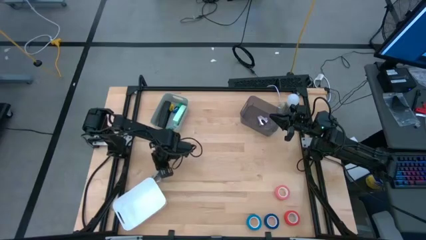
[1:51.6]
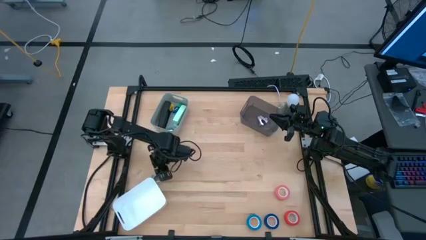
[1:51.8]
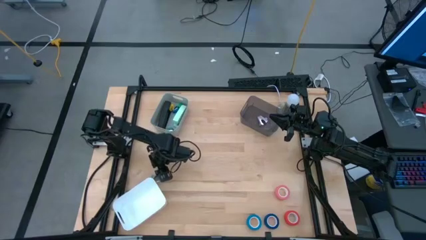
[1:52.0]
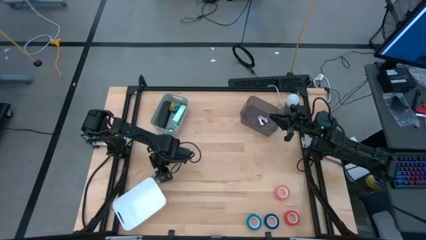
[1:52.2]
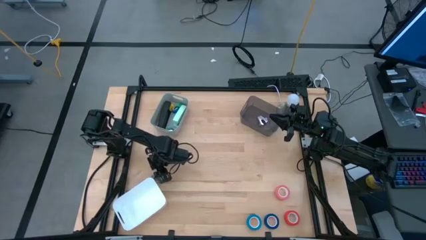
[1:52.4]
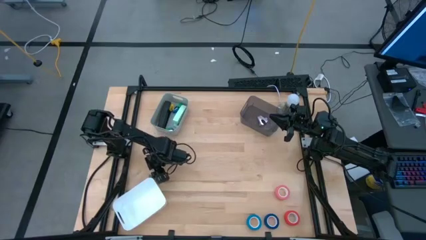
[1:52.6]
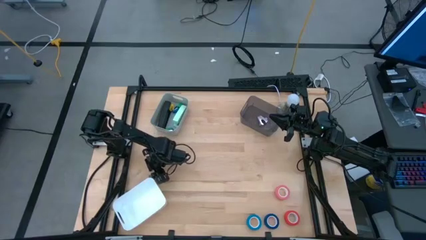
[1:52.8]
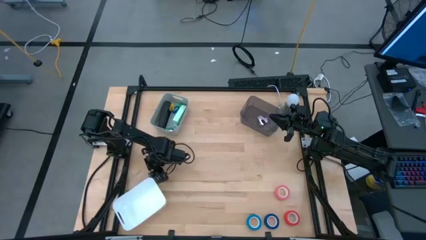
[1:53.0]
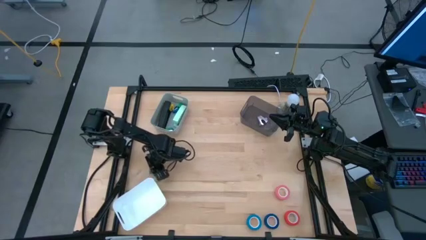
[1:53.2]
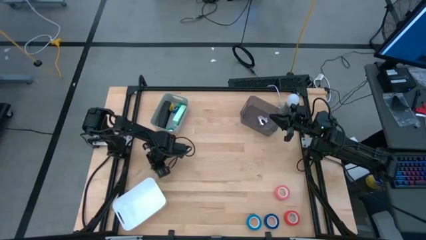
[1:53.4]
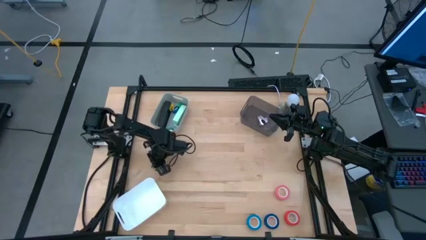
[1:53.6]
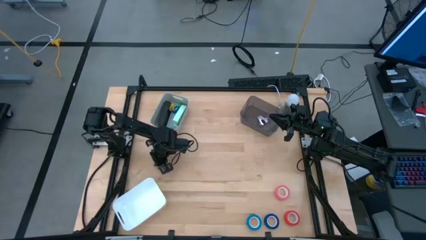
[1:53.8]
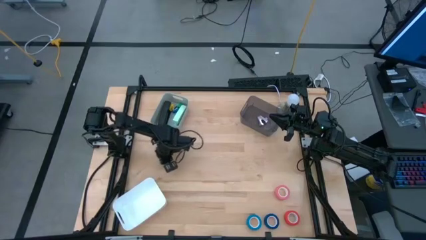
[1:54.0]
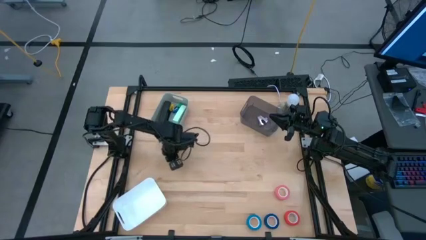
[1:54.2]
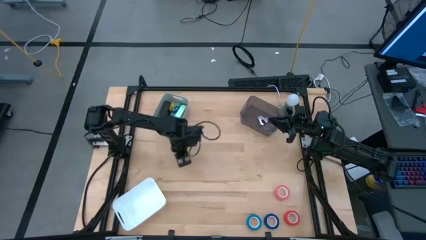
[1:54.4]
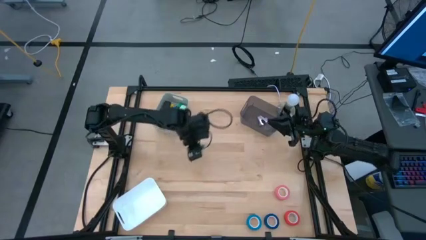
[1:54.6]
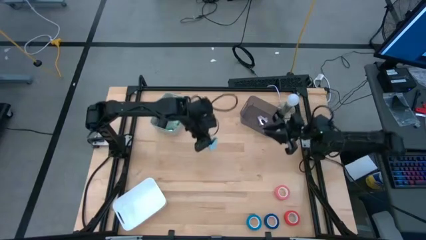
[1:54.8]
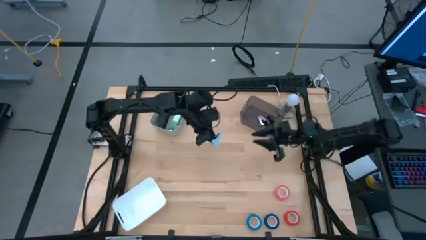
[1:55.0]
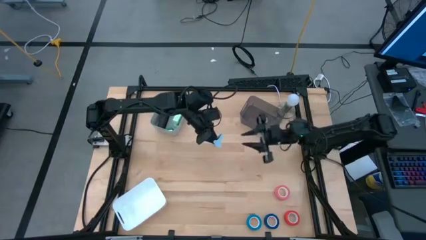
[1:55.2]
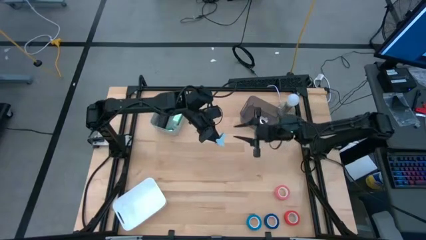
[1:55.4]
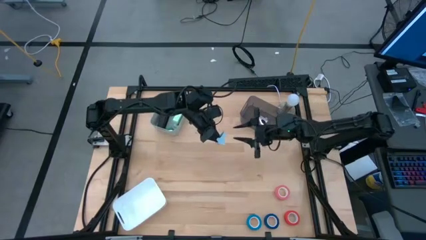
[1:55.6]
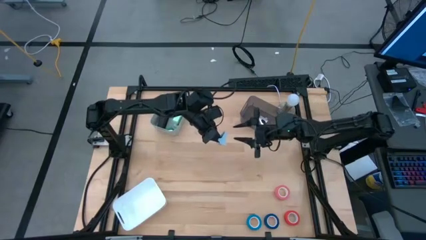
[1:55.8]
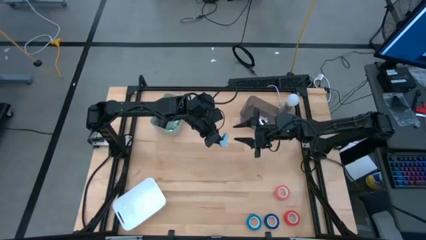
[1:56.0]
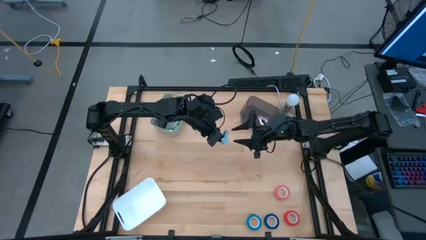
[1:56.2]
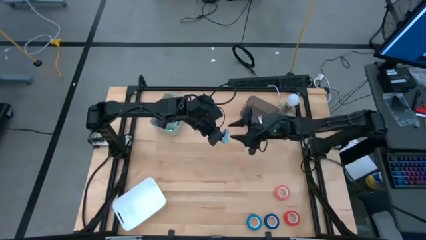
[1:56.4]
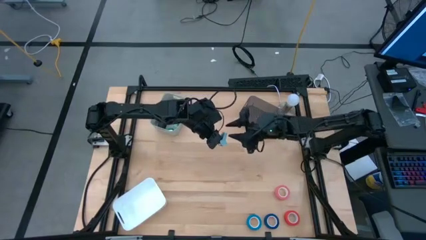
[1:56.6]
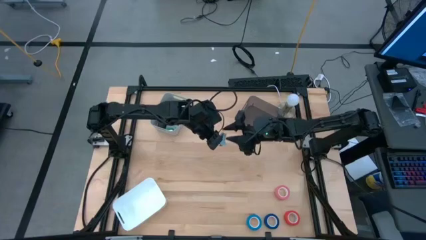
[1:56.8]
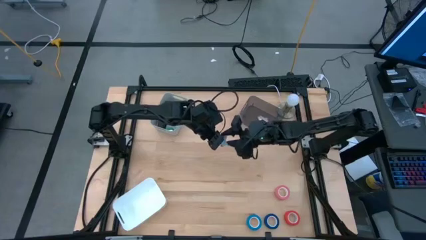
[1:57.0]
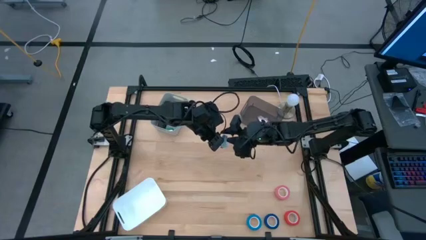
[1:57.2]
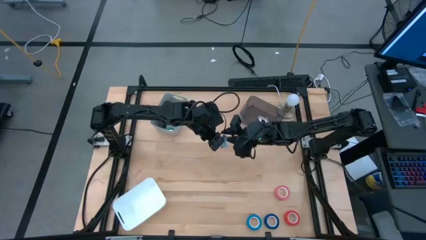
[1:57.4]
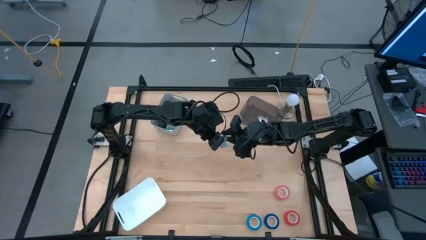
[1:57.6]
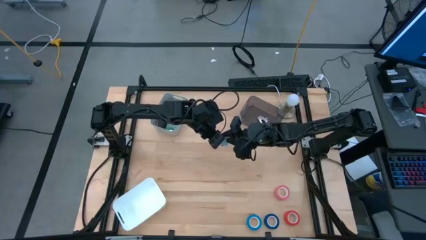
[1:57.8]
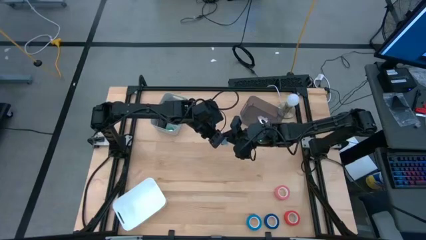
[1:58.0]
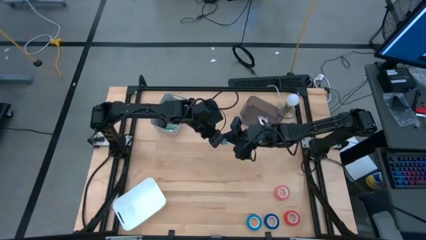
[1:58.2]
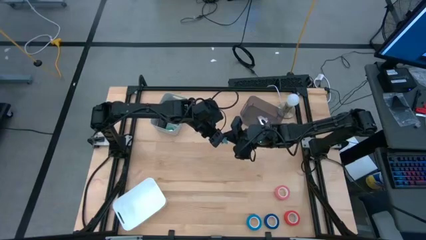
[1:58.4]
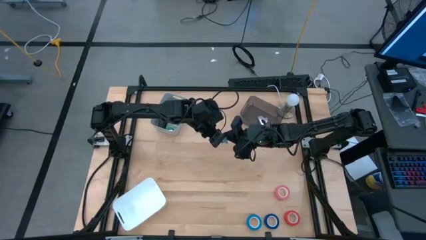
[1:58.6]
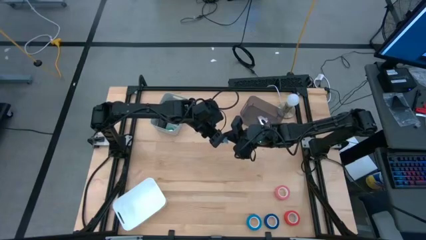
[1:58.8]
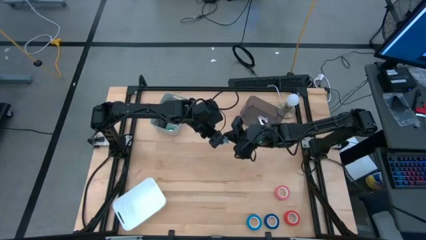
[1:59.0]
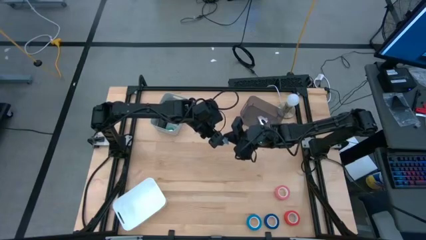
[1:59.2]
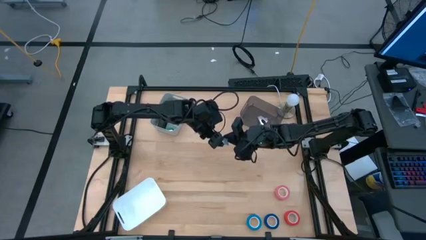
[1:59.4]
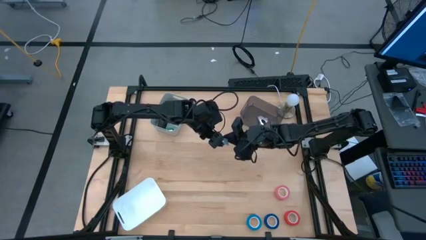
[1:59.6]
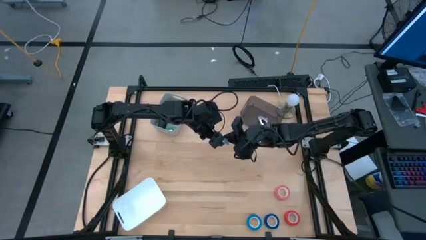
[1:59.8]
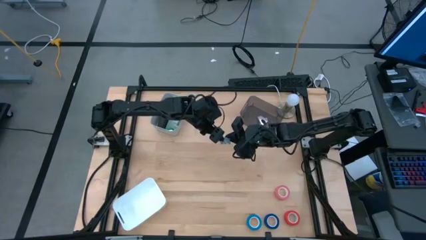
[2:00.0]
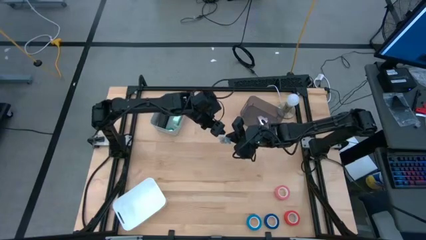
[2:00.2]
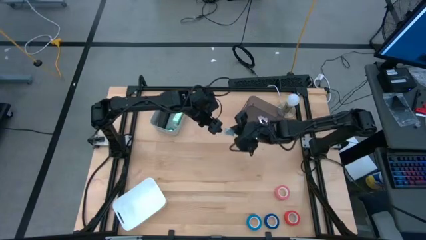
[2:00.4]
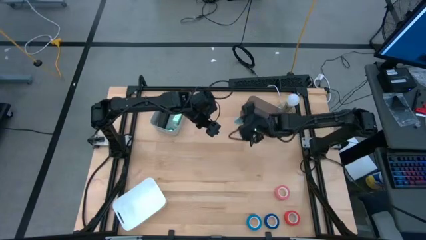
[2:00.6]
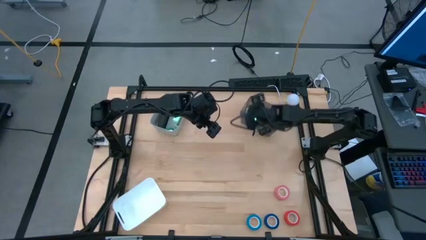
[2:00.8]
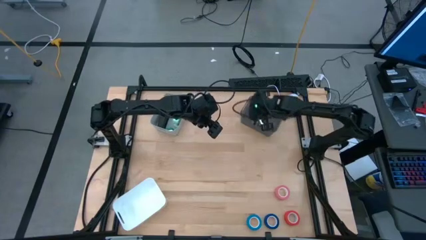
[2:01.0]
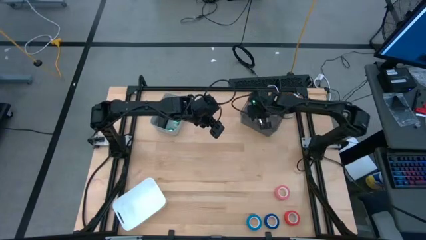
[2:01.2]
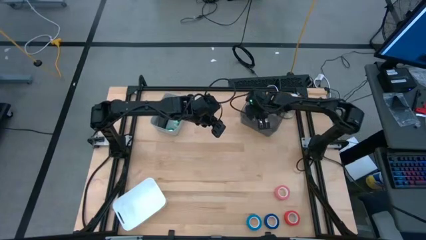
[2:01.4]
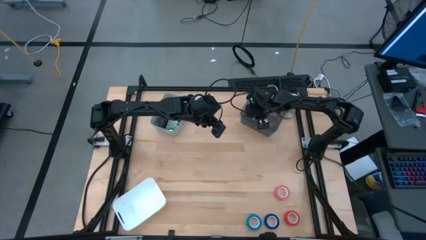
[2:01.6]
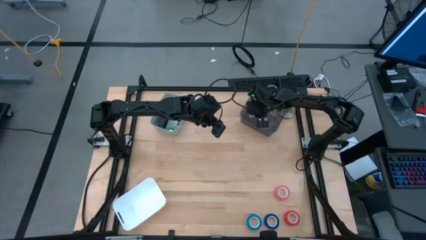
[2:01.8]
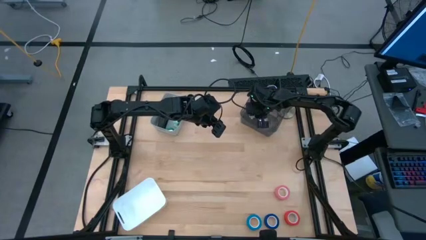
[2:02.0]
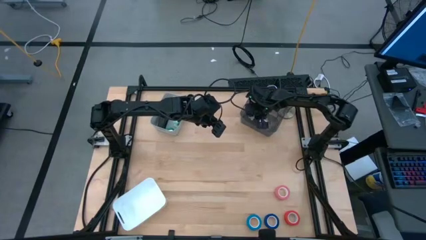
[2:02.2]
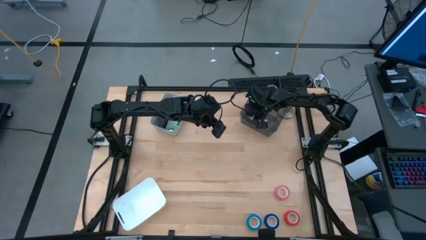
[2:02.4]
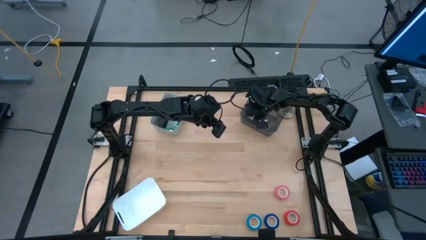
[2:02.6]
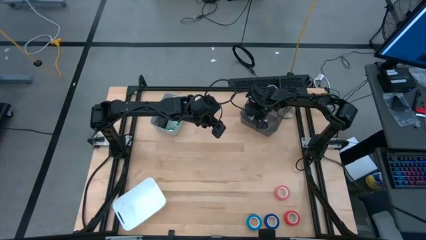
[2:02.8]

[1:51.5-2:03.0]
Task: Pick and place Stapler, Stapler remover, tape
Put the blue staple remover into the black bin

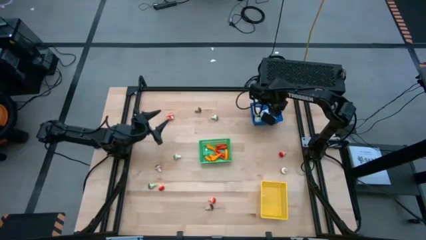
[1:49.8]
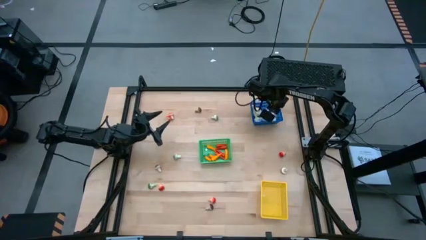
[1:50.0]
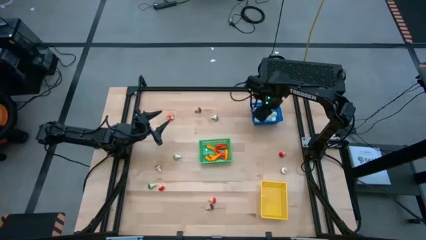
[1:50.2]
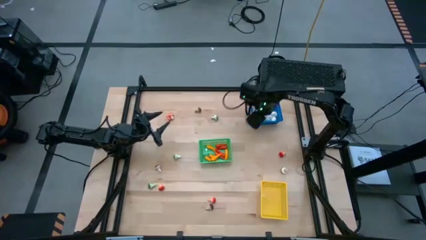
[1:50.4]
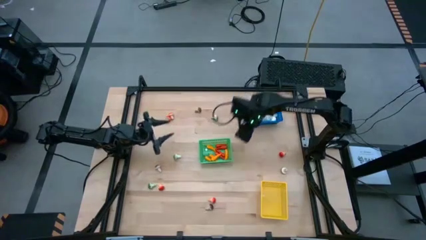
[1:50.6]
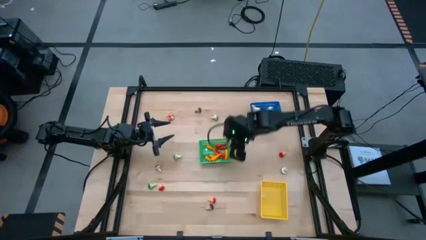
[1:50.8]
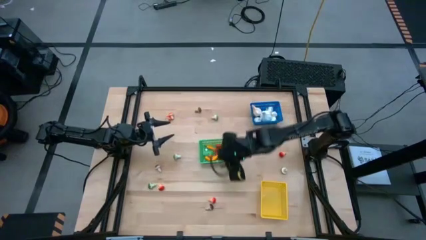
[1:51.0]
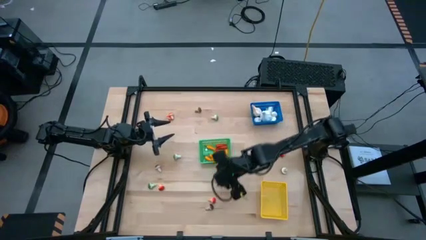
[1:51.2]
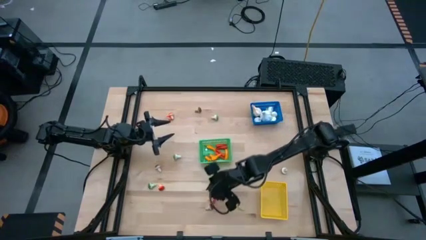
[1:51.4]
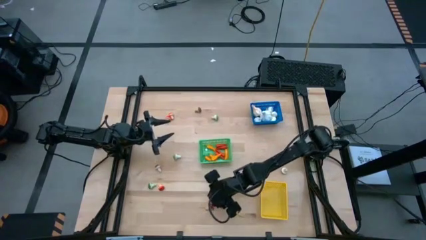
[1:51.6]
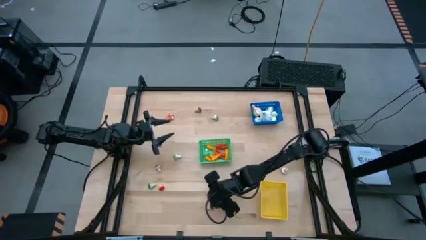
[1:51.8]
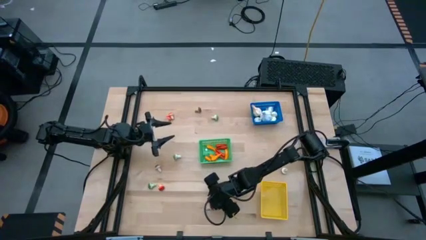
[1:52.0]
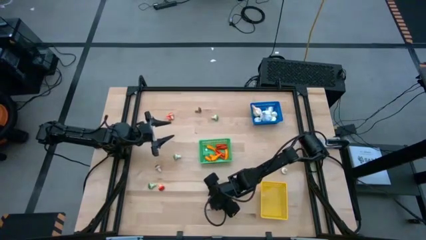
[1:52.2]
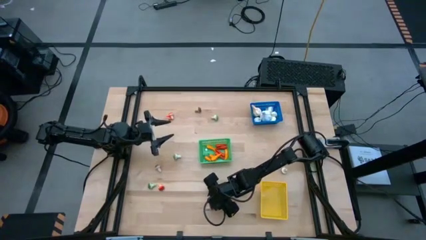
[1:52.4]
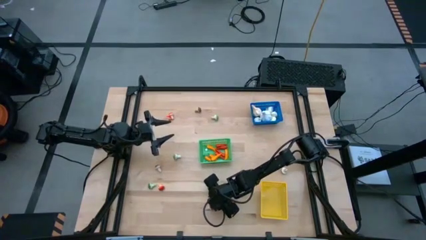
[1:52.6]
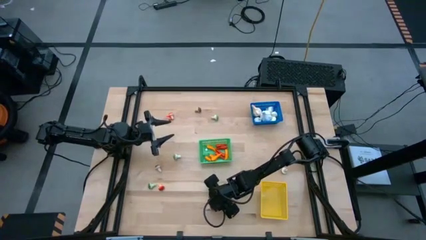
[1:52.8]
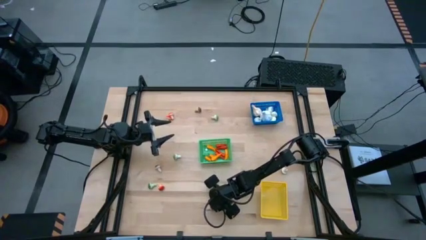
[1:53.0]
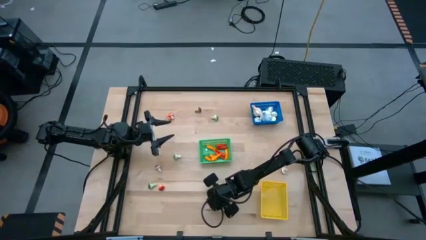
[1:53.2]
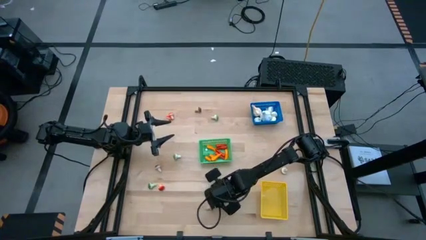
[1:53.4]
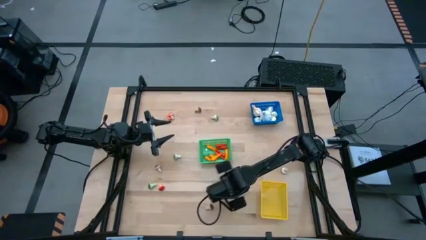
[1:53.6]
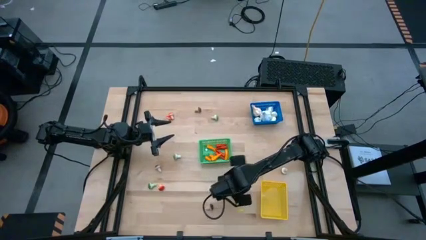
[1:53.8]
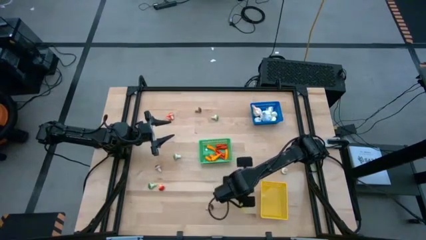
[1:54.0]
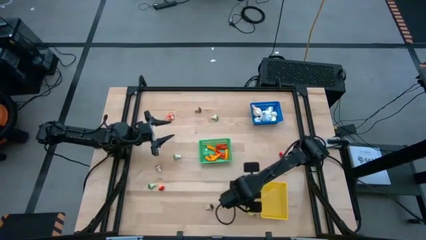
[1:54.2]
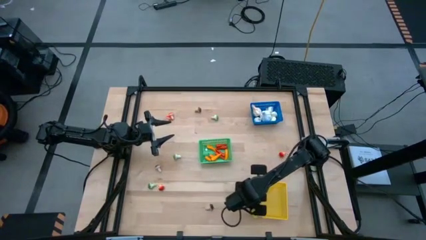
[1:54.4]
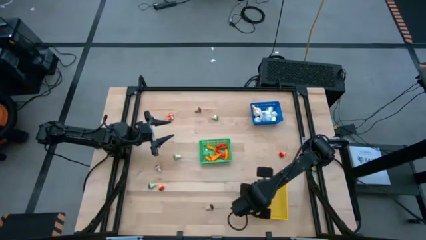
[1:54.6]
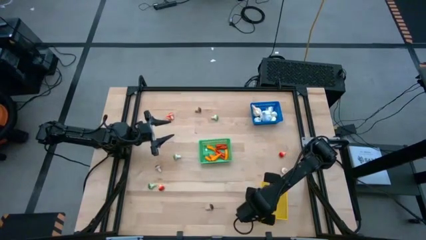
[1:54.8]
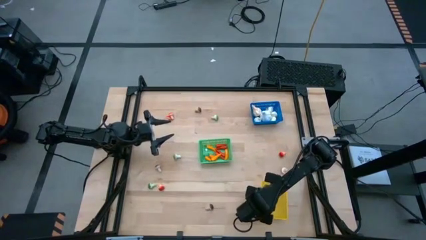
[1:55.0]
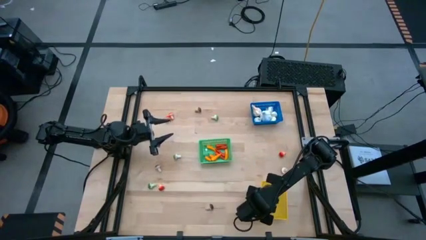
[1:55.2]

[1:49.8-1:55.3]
Task: Sort produce into baskets
Put the orange mushroom into the yellow bin
